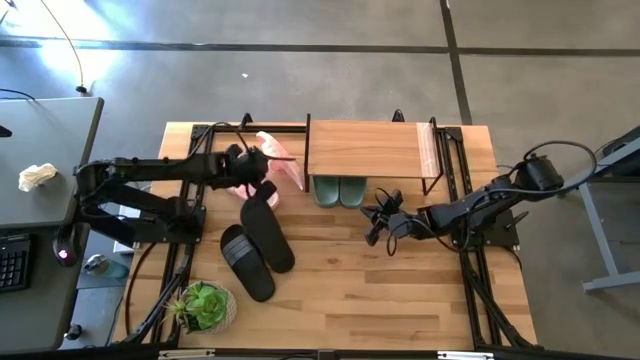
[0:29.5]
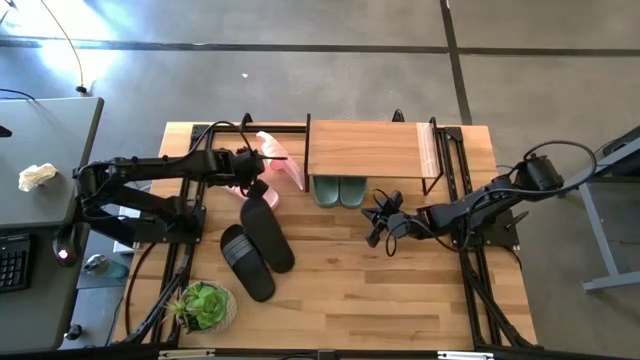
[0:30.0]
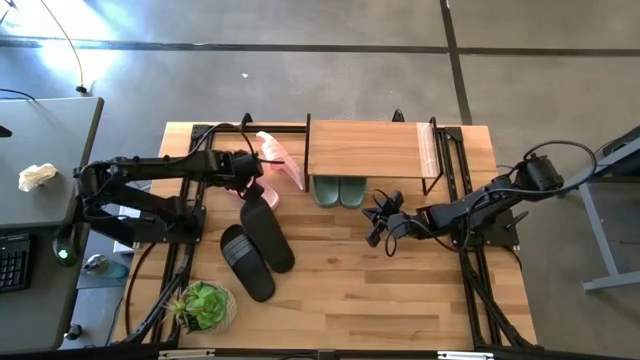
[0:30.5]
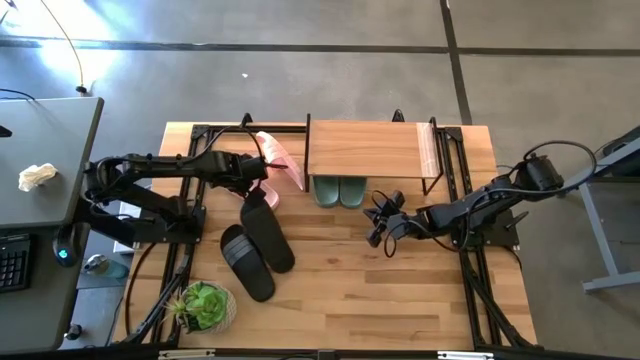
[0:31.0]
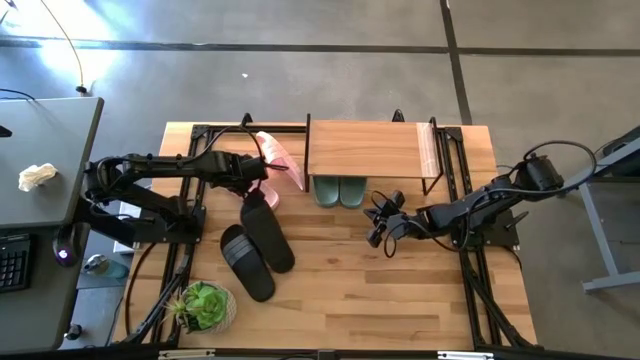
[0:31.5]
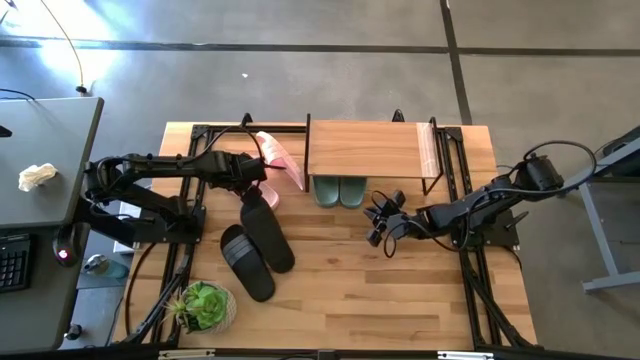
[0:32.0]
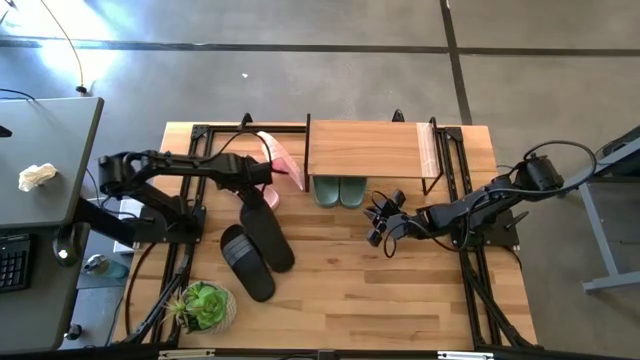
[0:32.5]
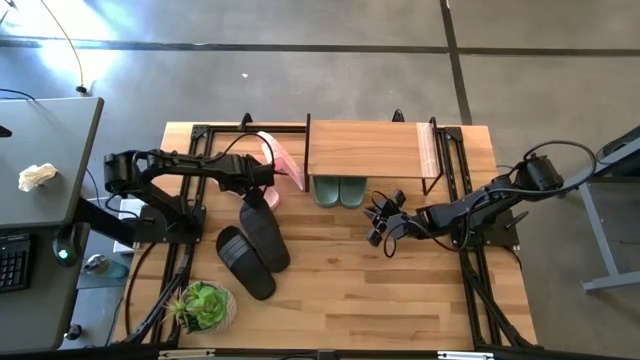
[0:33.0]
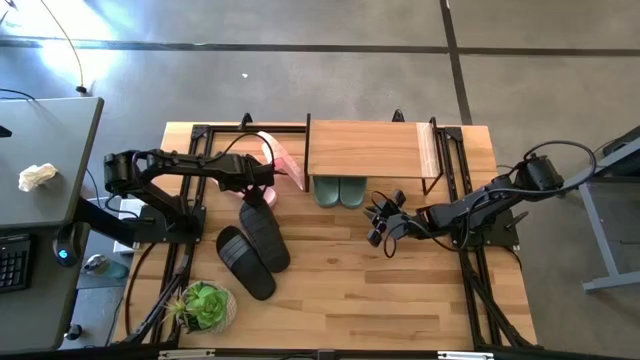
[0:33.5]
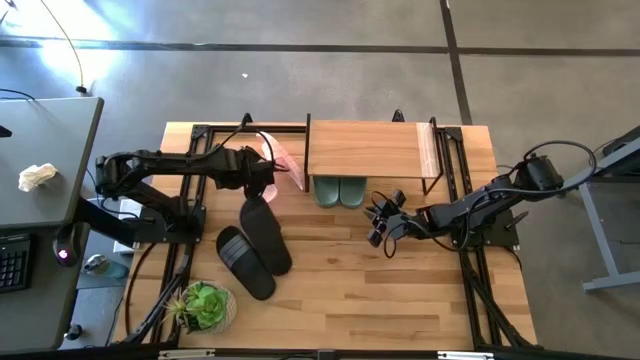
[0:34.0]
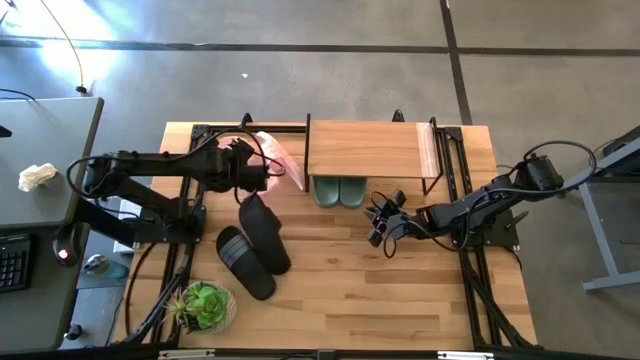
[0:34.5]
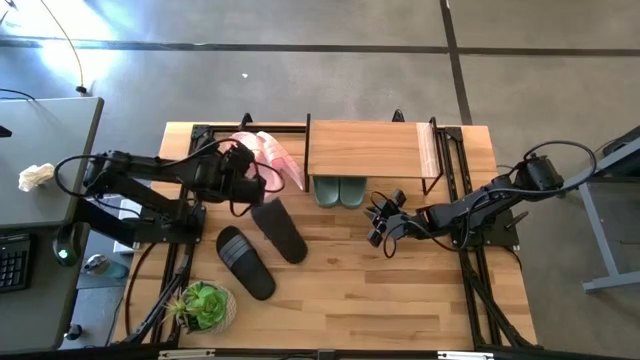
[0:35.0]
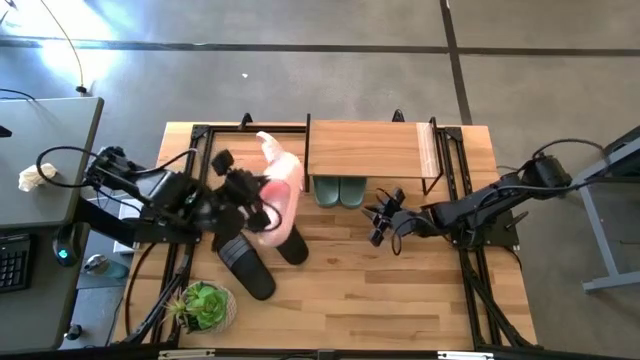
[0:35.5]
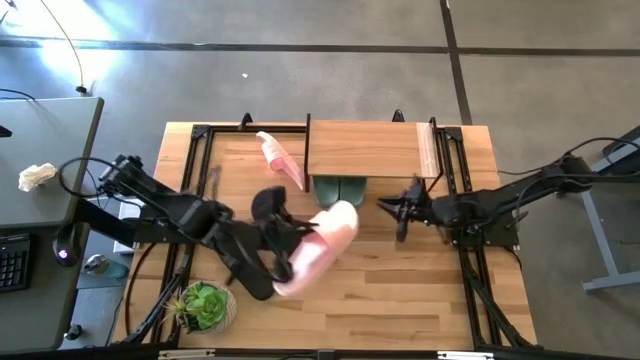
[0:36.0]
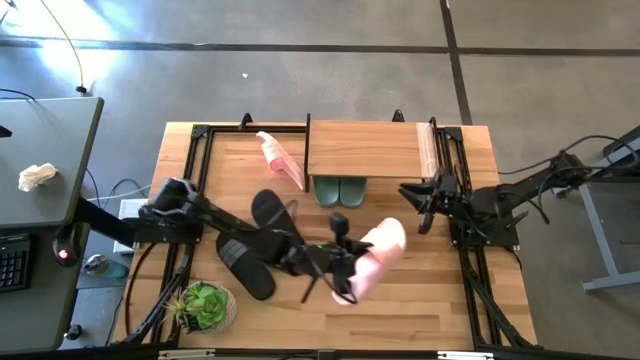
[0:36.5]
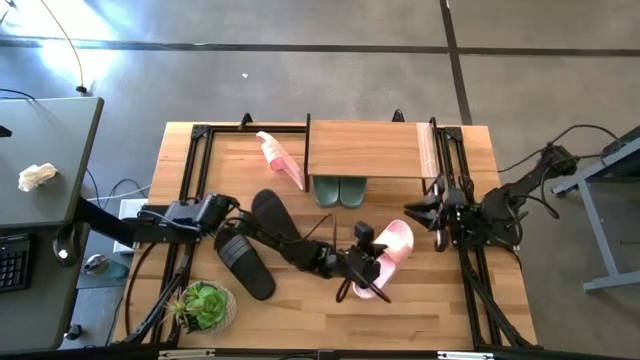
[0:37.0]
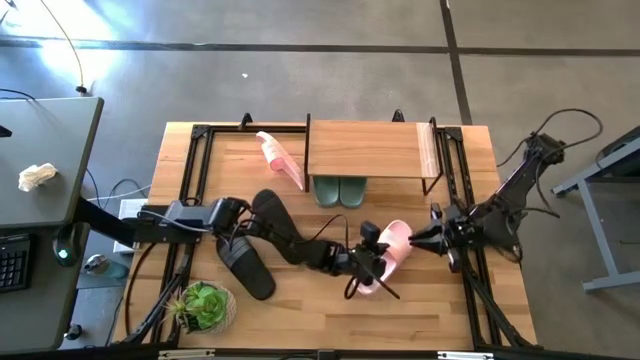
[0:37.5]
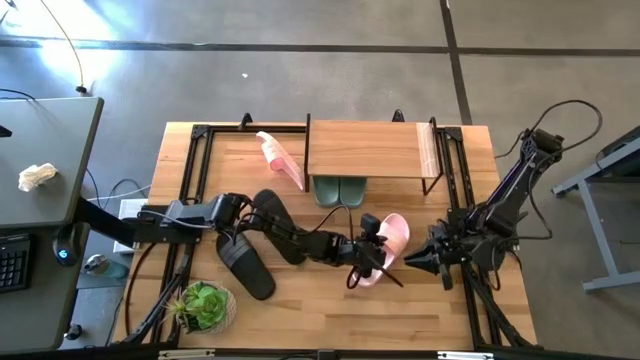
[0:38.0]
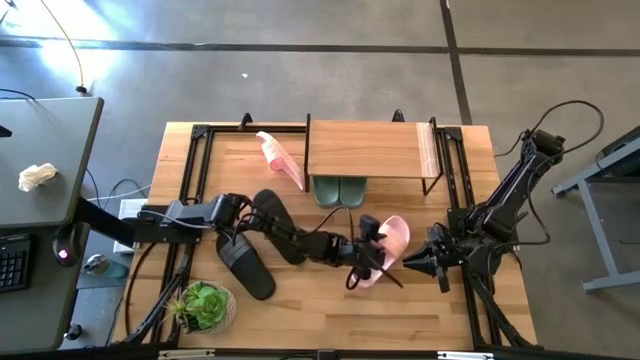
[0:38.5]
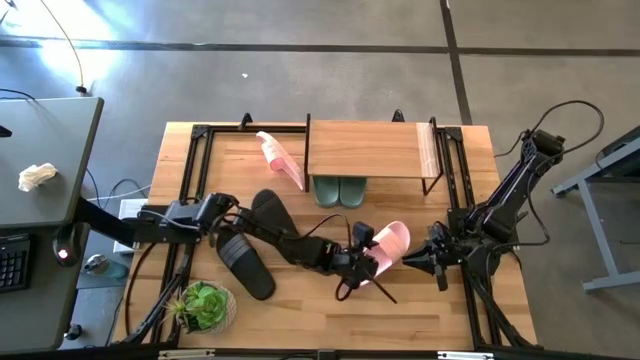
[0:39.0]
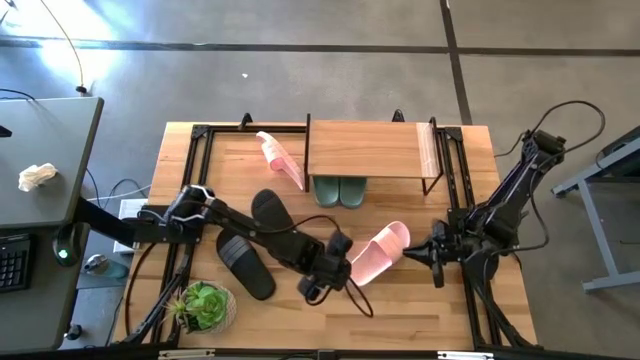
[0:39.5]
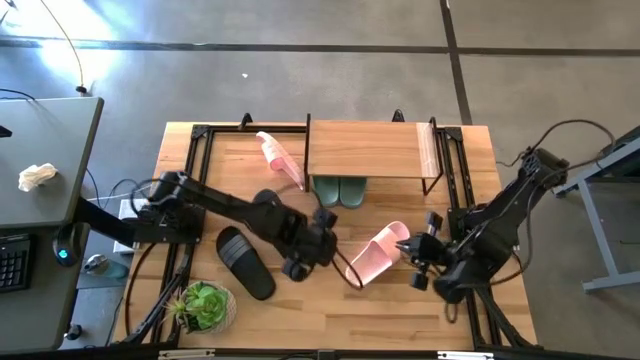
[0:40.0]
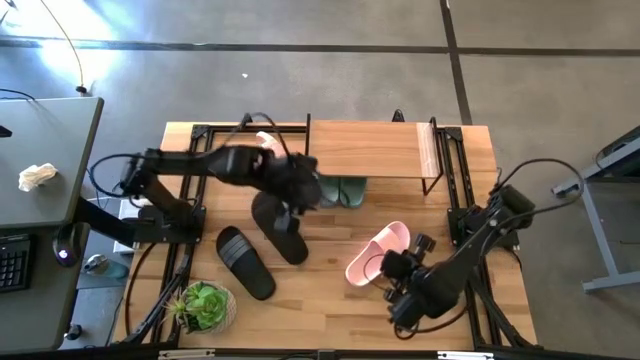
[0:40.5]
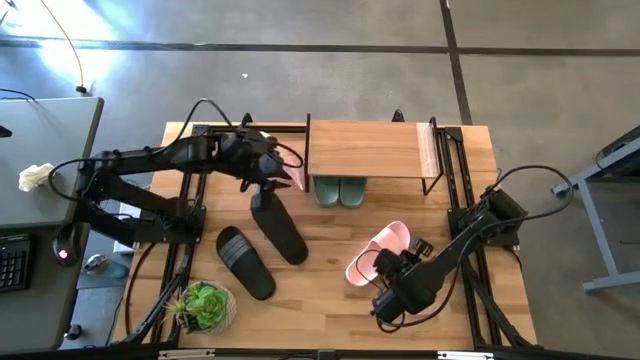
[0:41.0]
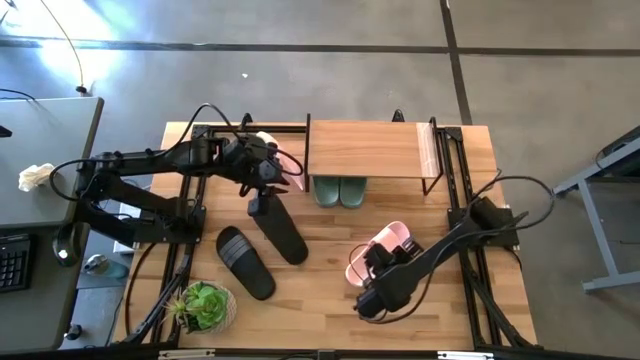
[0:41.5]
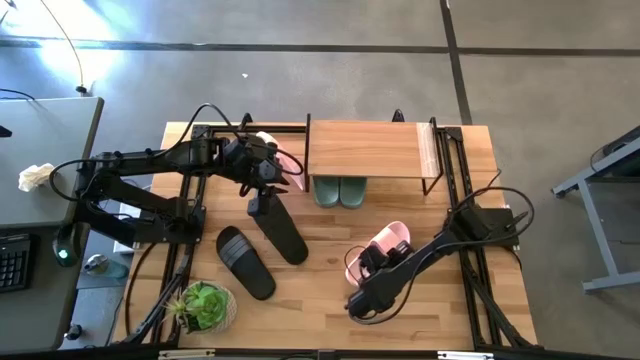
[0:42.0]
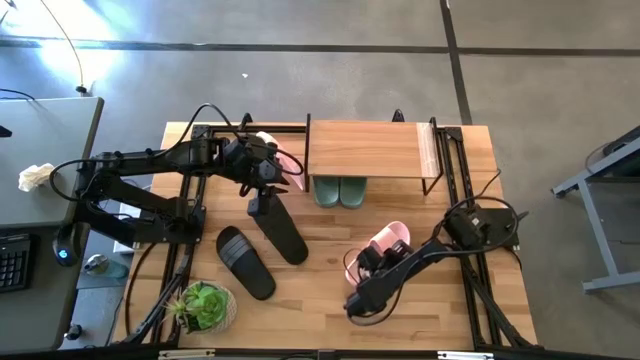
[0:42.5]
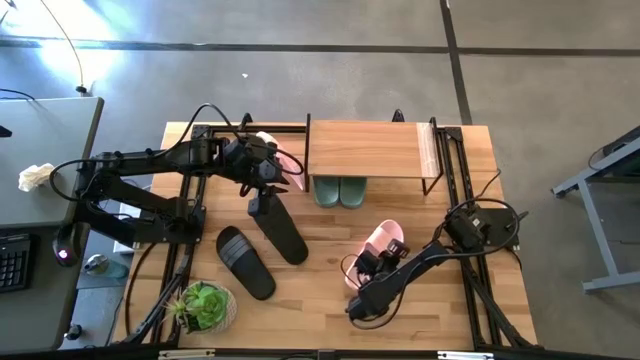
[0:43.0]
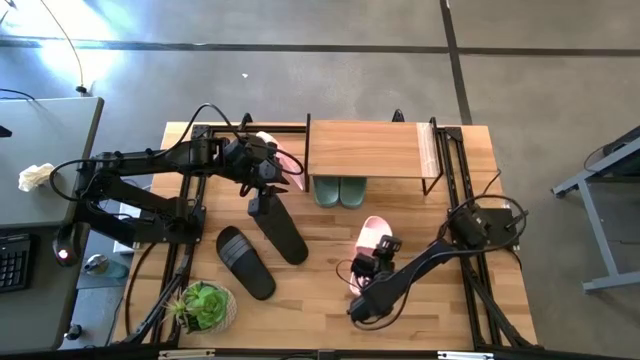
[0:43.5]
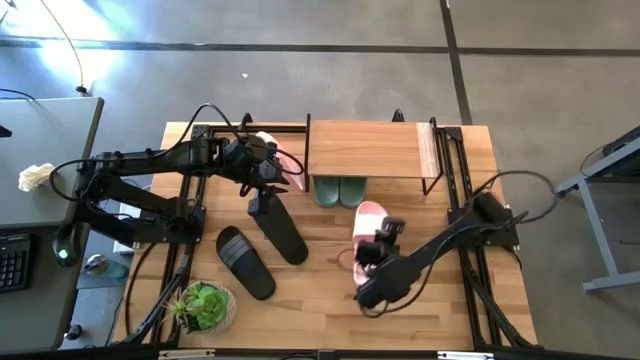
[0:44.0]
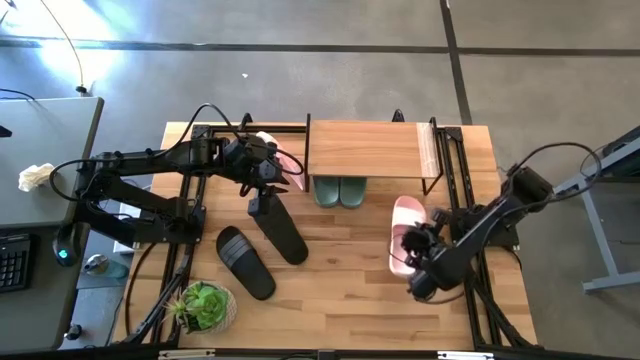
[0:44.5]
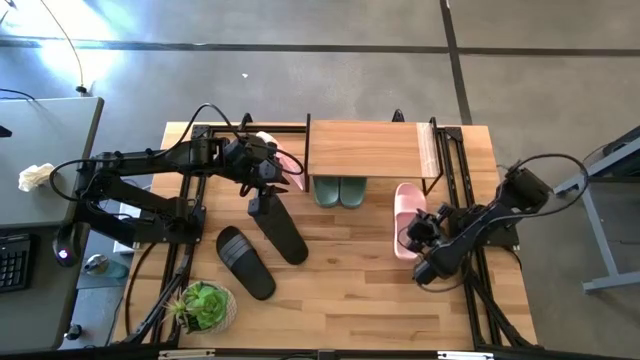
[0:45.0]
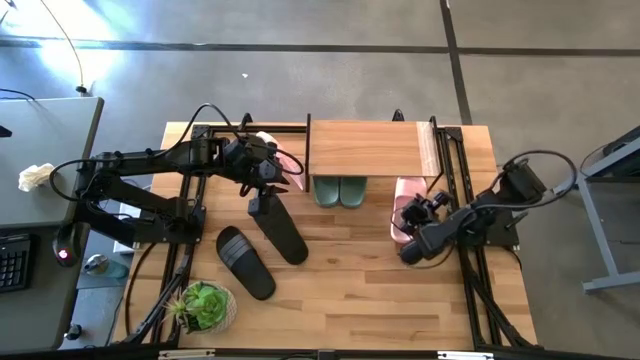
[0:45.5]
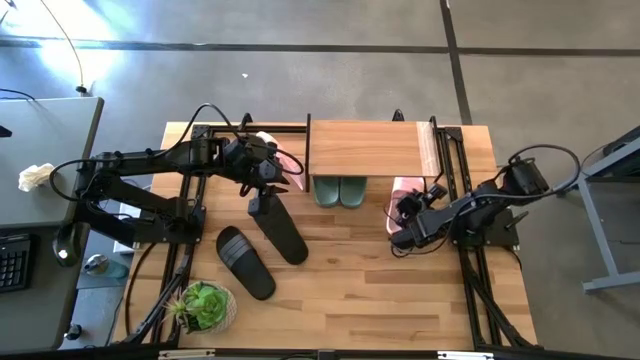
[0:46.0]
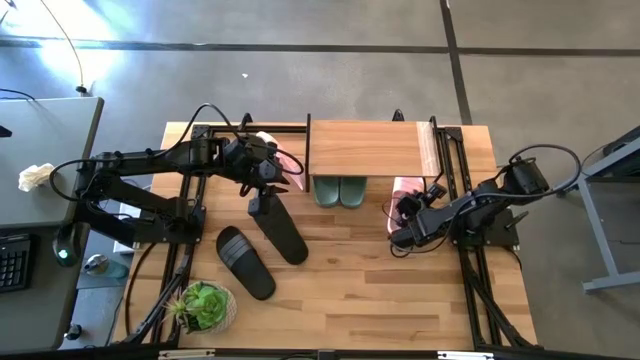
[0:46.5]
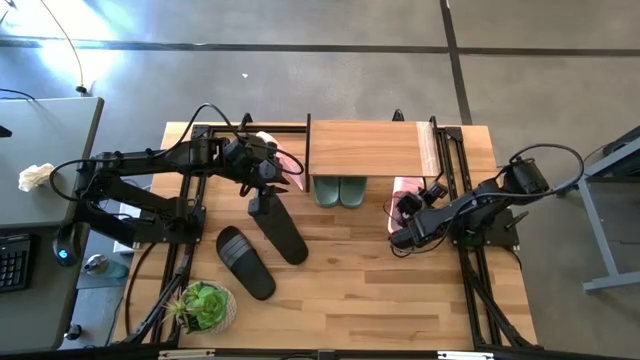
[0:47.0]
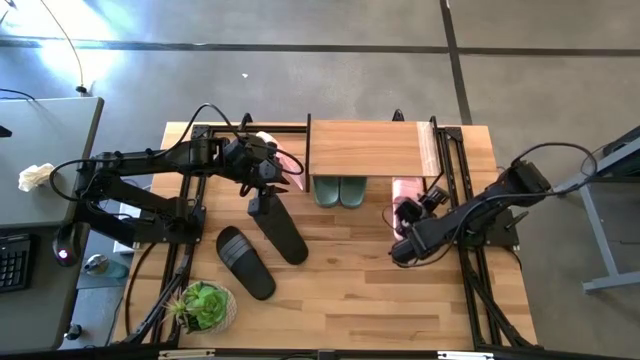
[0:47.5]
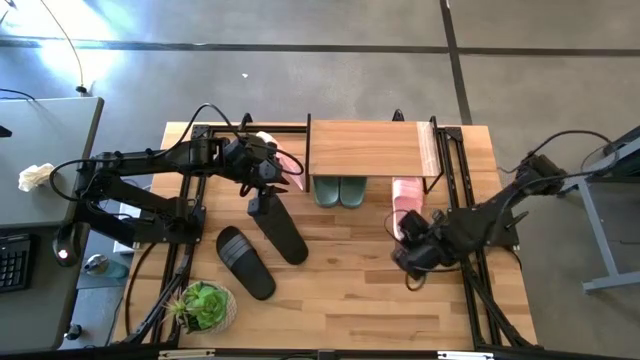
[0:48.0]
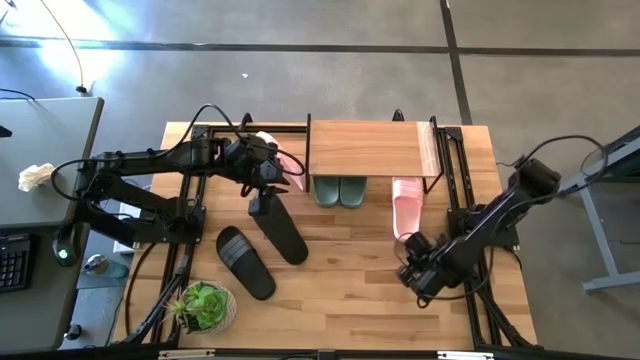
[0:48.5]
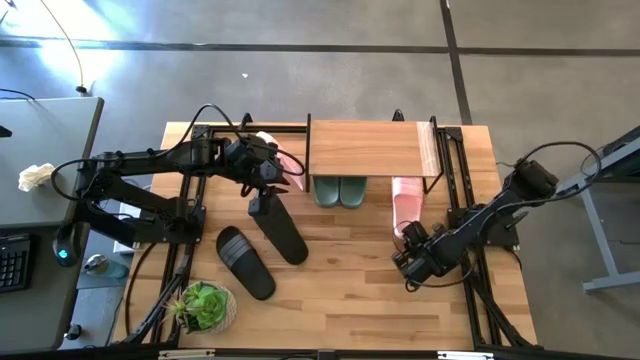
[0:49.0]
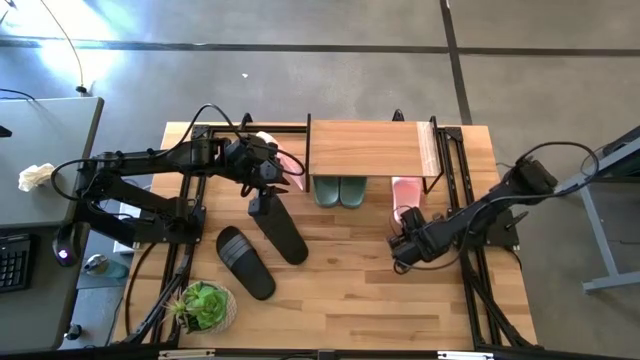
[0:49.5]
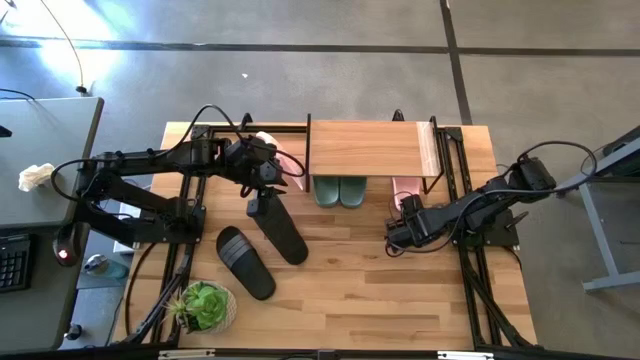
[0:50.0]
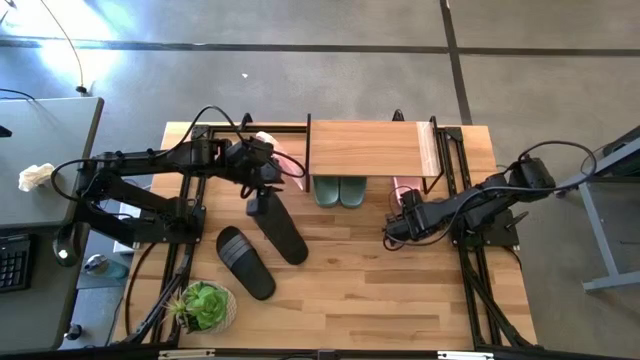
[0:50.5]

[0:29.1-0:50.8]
Task: Pick and place slides into the shelf
Put the left pink slide under the shelf
